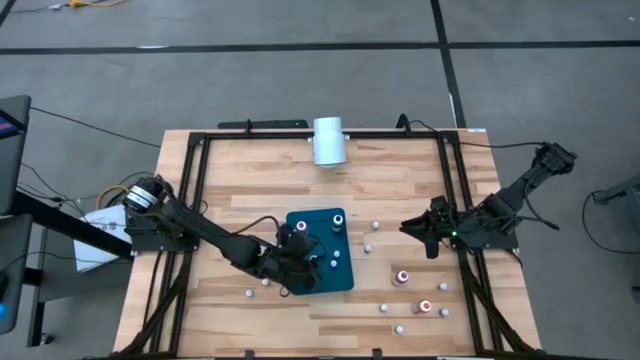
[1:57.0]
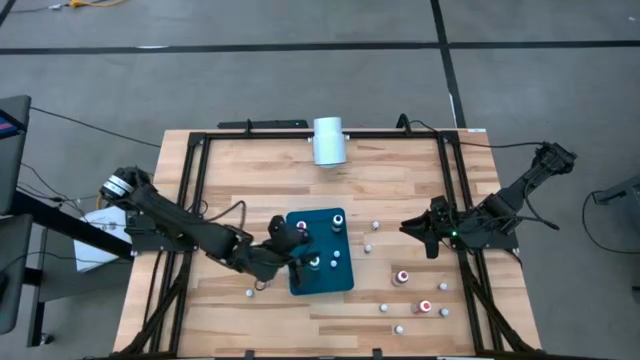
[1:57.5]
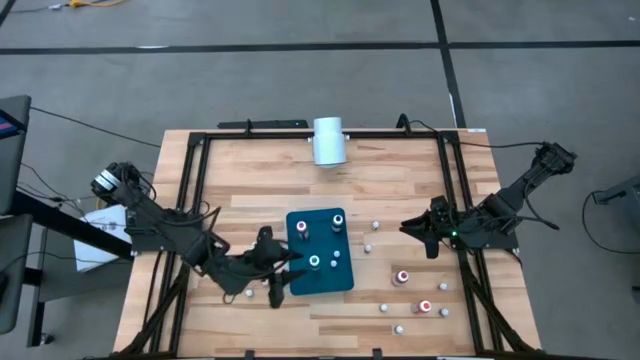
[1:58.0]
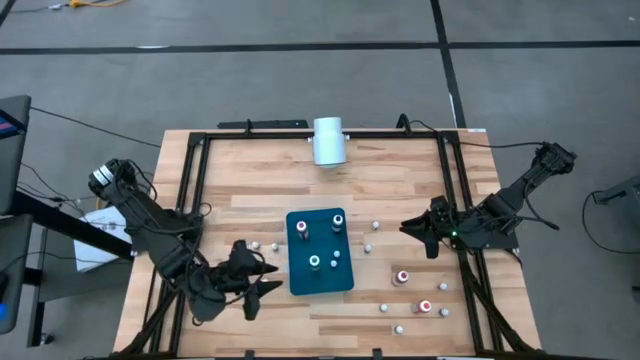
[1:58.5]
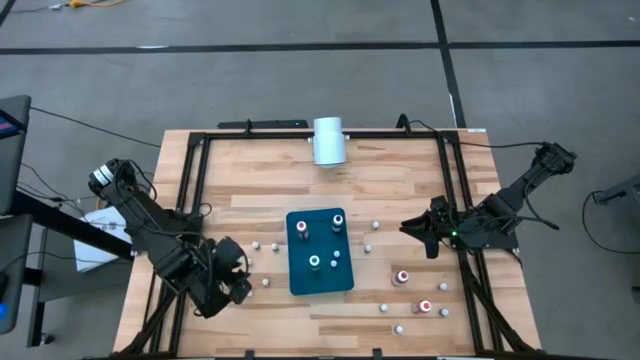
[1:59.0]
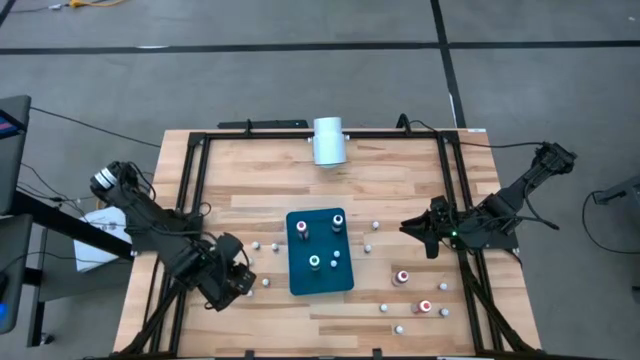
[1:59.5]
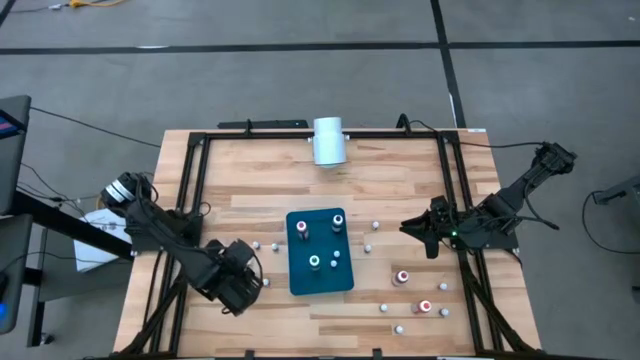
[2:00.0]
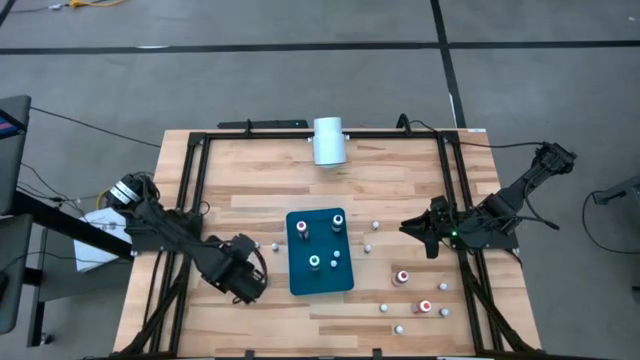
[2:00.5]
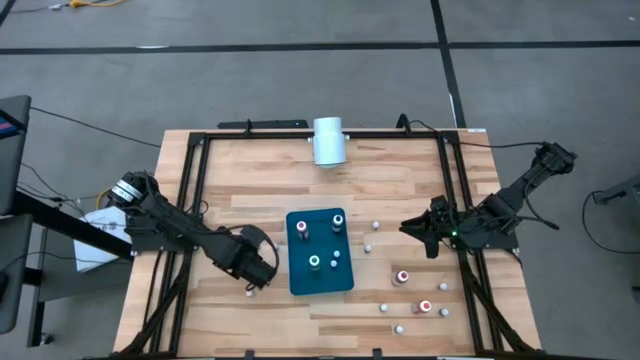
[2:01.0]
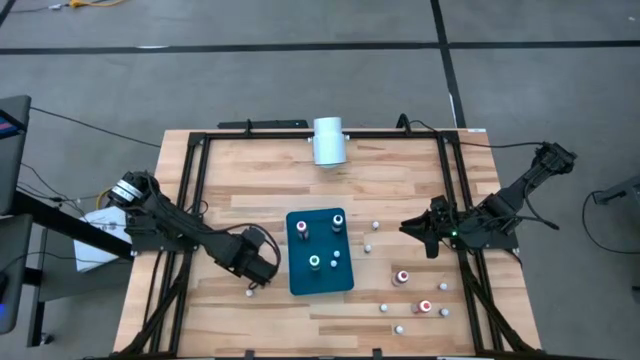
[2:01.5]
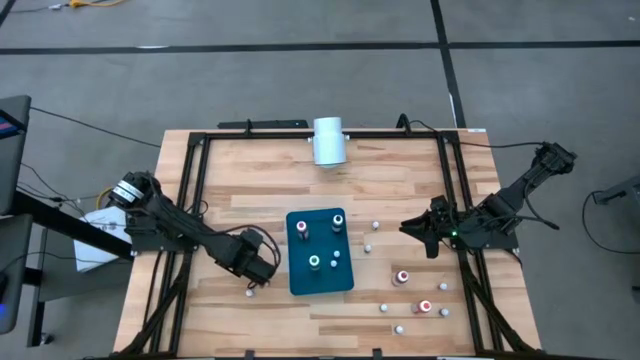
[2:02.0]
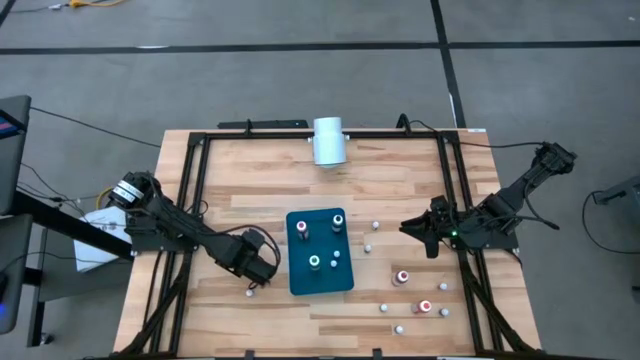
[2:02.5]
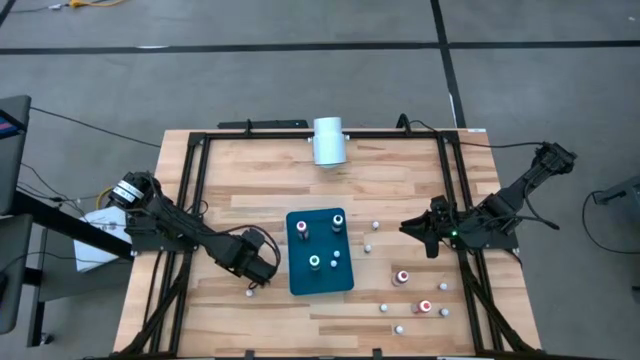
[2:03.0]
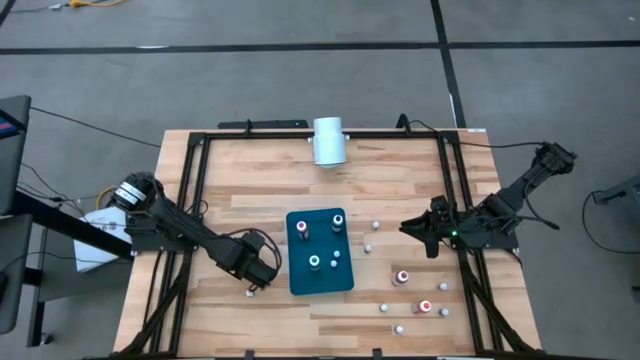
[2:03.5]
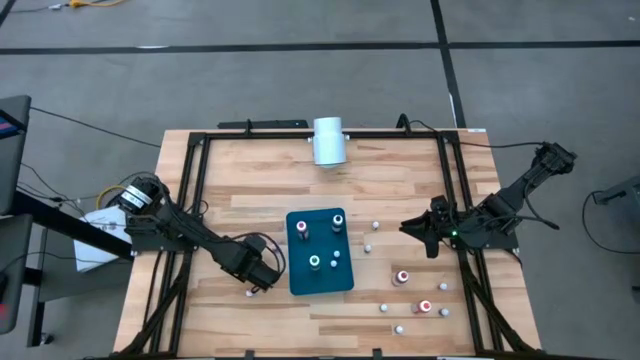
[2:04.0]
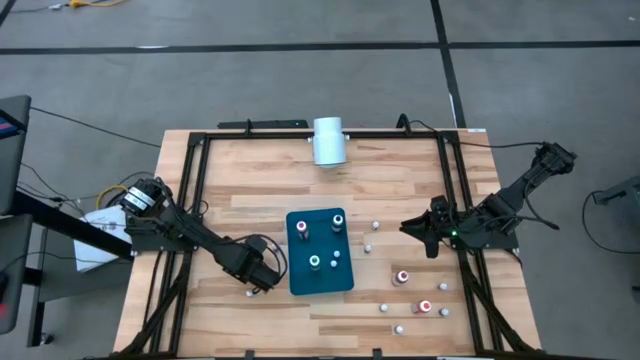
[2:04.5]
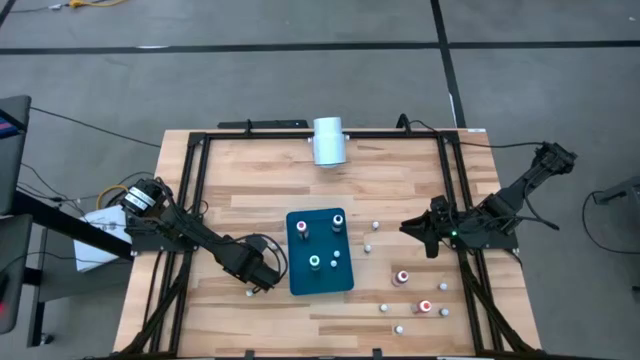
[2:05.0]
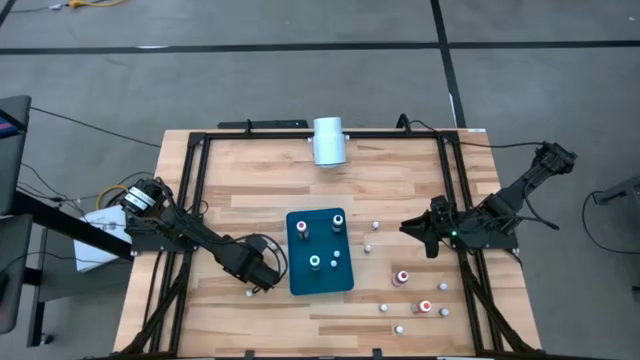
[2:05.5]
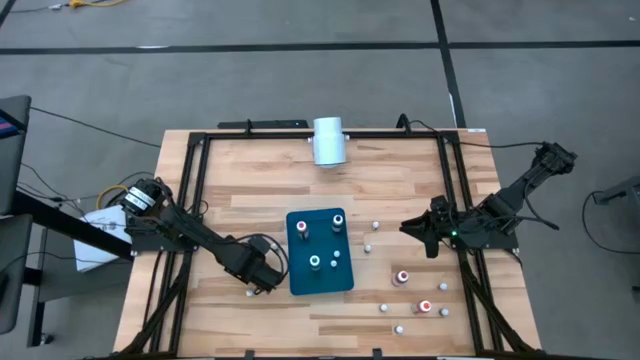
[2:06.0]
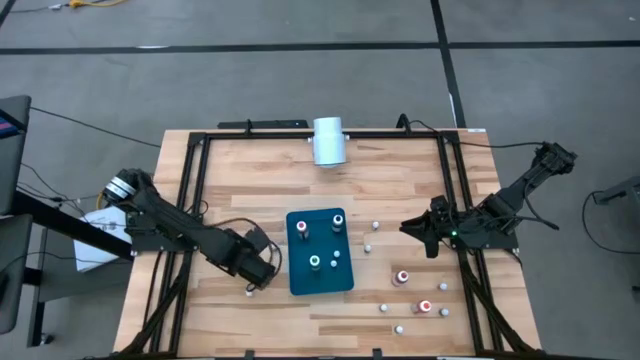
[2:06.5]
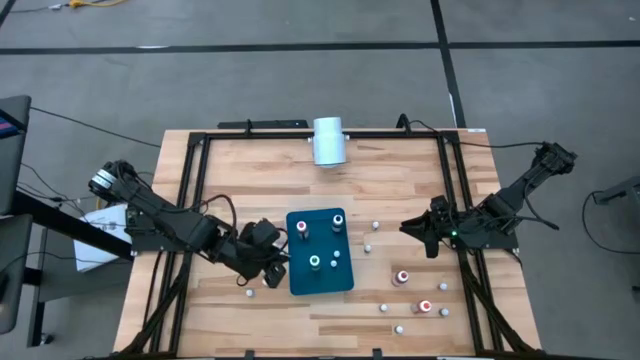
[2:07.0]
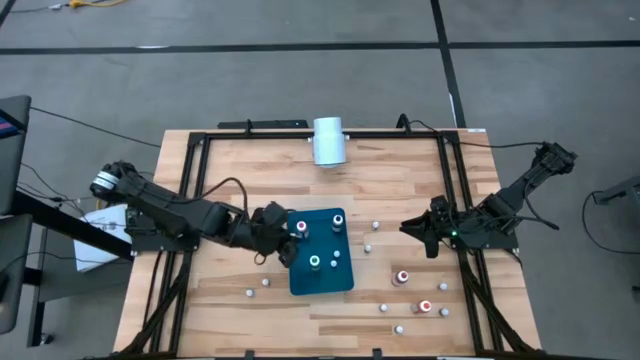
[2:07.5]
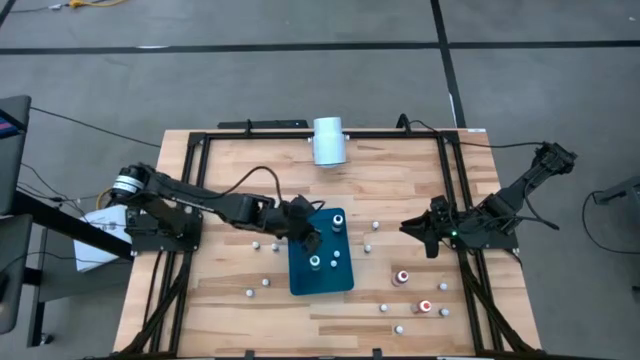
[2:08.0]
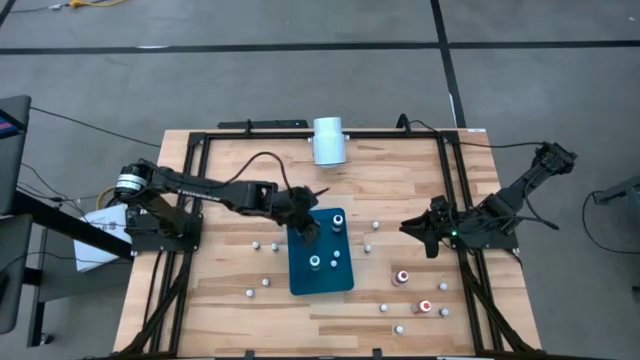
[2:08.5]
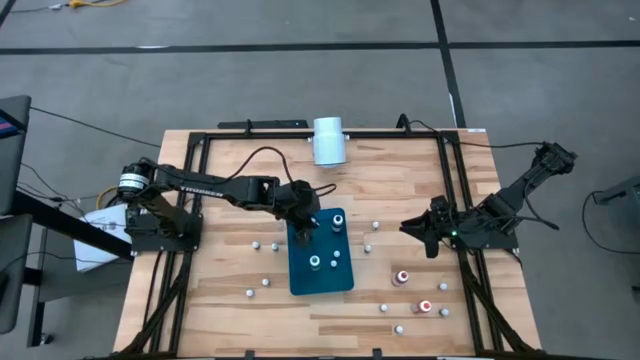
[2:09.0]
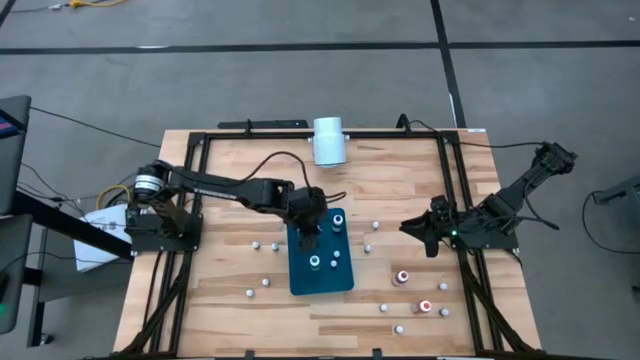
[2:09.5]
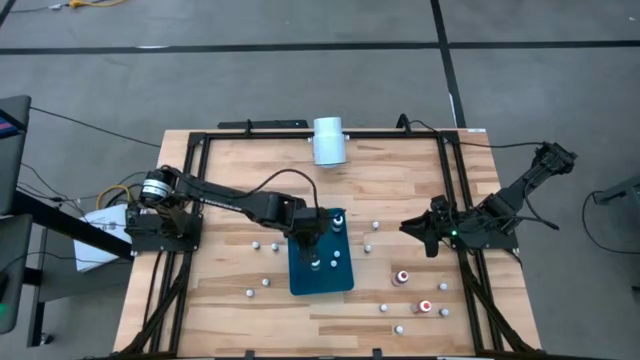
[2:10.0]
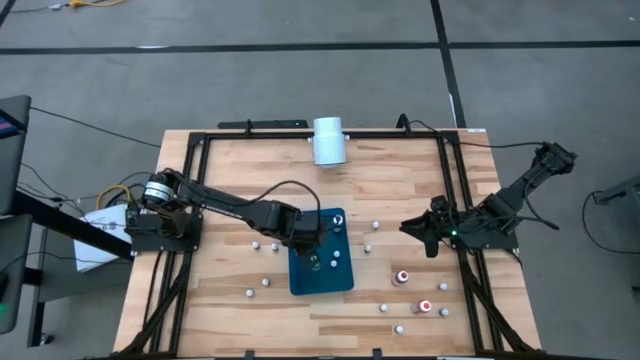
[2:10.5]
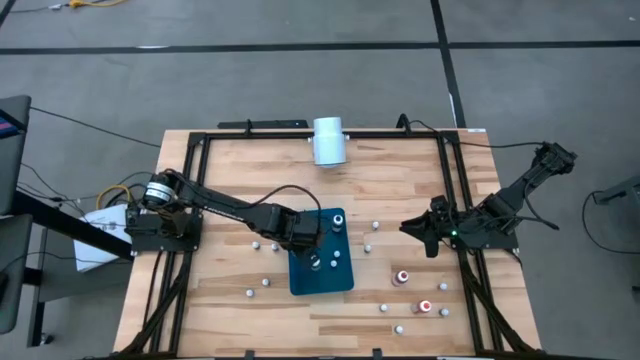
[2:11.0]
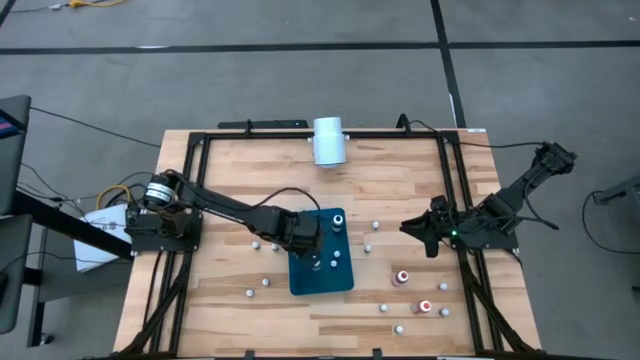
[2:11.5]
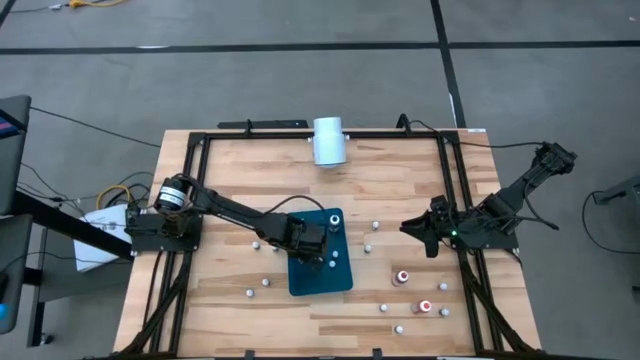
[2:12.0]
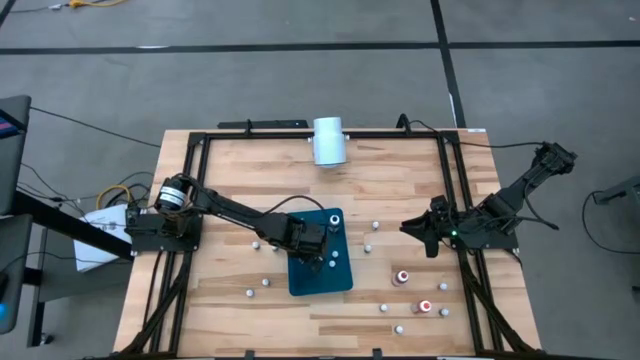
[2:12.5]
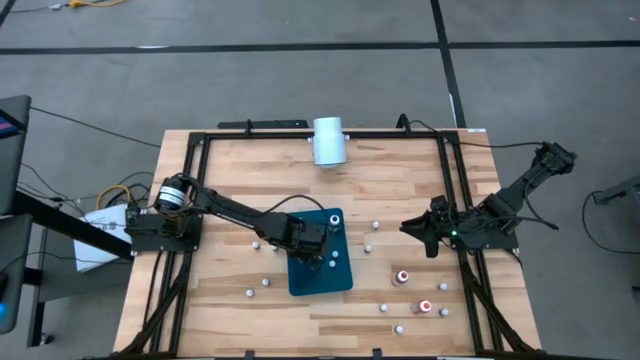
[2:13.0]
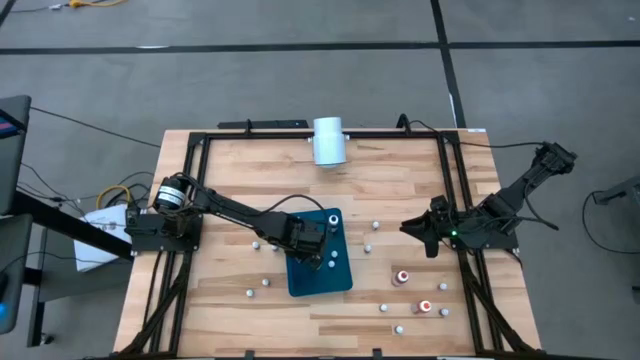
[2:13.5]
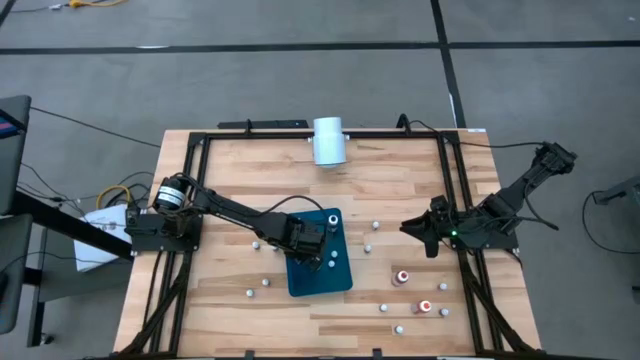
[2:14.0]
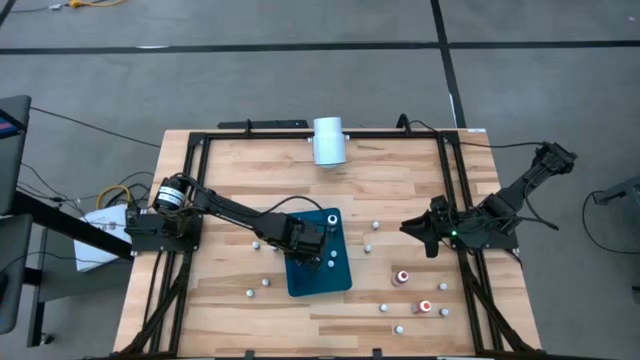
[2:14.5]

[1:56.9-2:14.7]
Task: Pick & Place food coloring
Put the left small black food coloring bottle into the blue bin

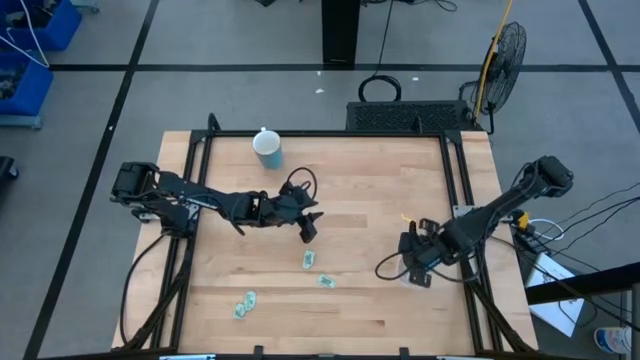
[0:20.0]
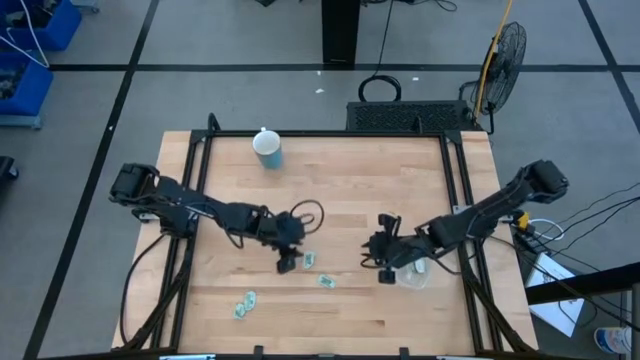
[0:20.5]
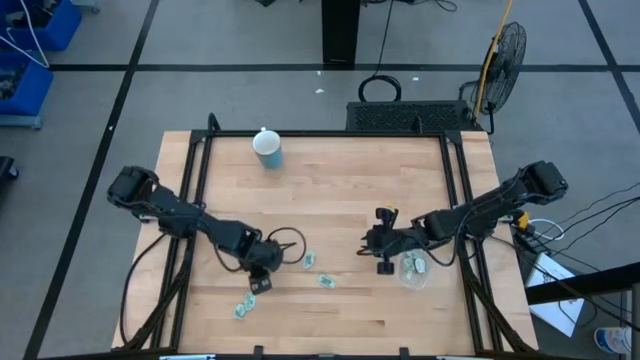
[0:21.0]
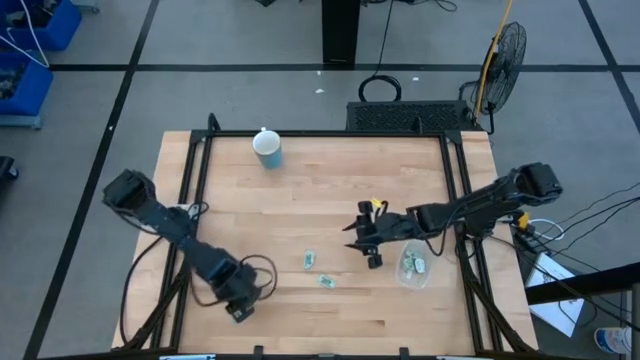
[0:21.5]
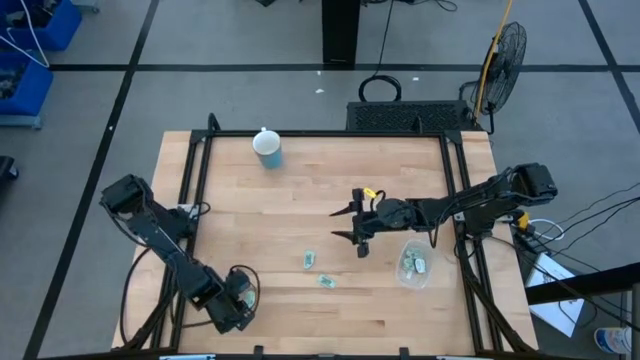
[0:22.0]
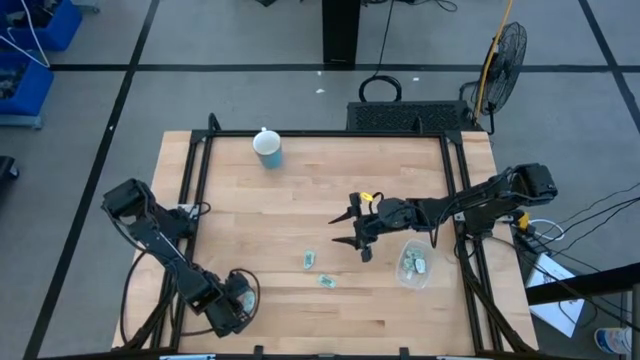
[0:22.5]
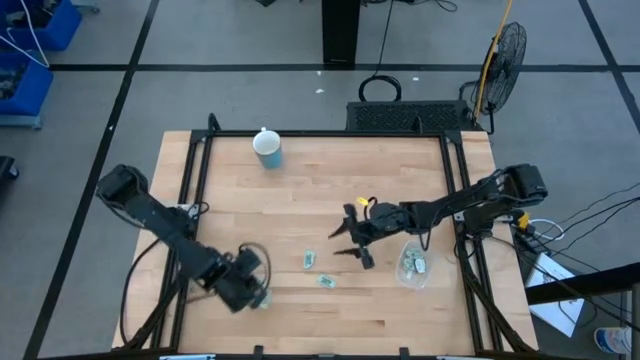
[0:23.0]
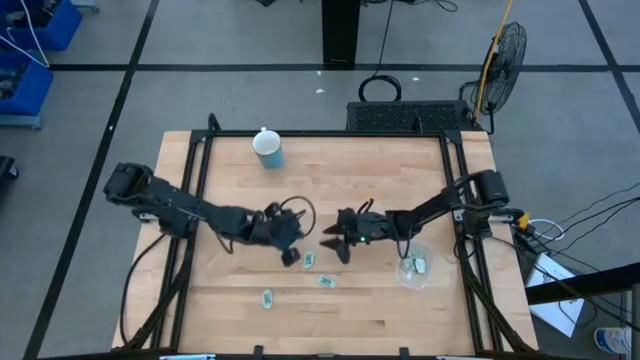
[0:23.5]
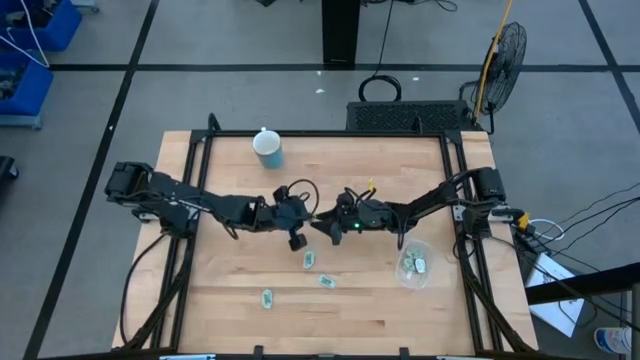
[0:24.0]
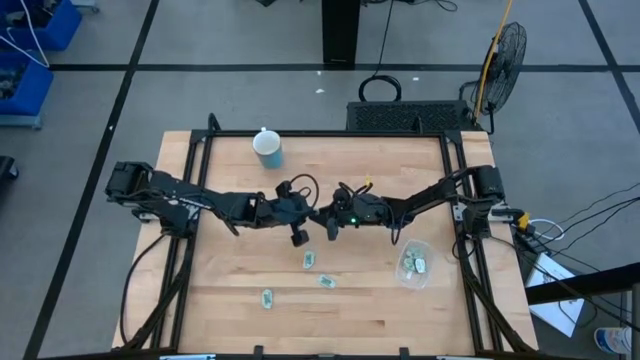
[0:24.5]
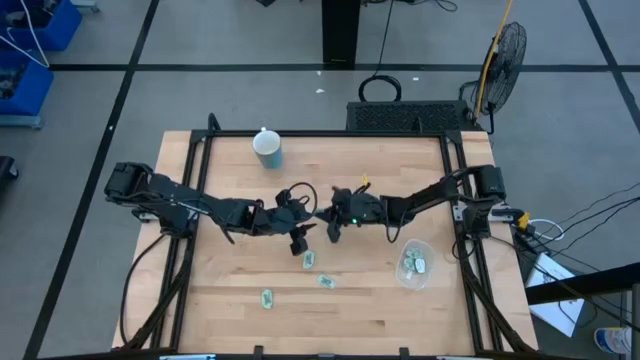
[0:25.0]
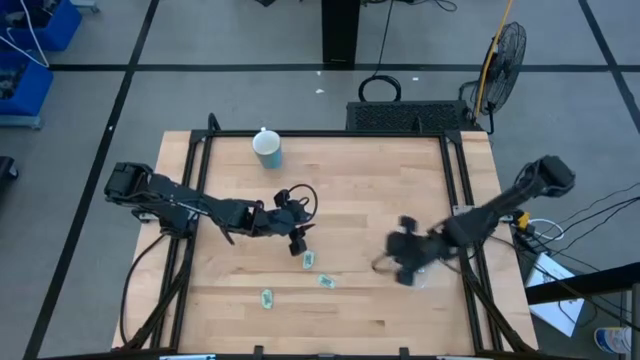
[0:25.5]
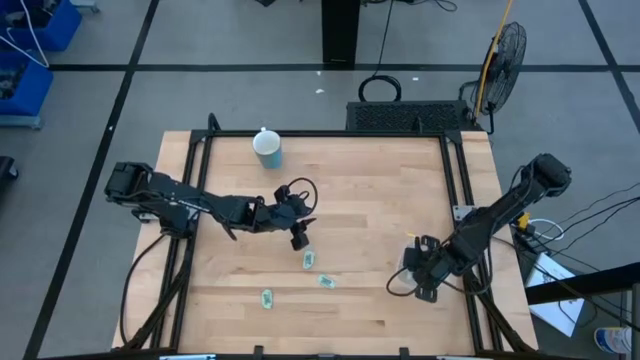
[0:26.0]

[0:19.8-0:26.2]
Task: Pick and place Stevia / Truvia into bins
Put the stevia packet into the transparent container
